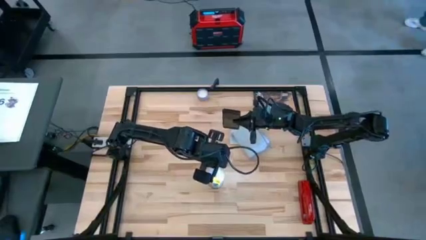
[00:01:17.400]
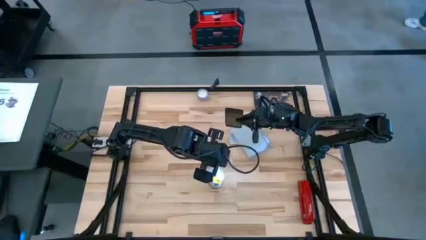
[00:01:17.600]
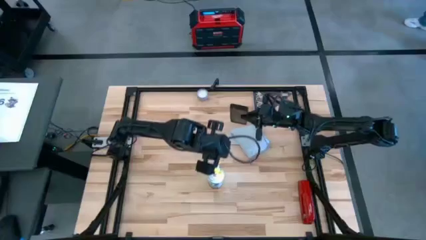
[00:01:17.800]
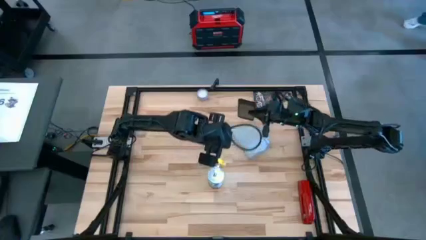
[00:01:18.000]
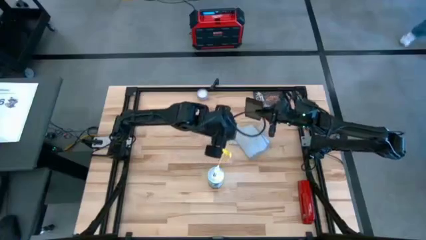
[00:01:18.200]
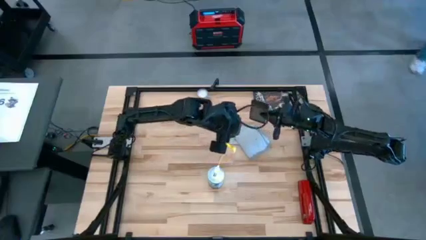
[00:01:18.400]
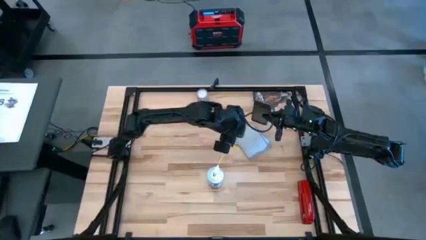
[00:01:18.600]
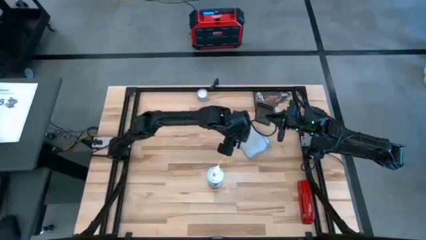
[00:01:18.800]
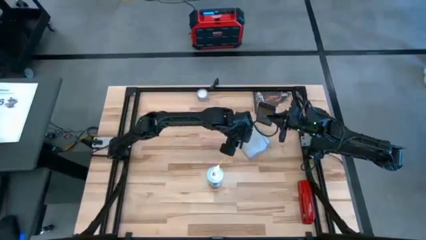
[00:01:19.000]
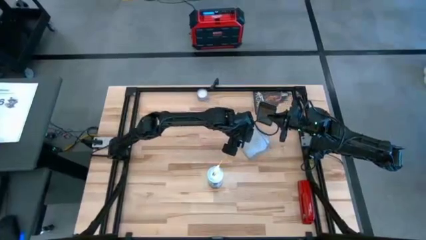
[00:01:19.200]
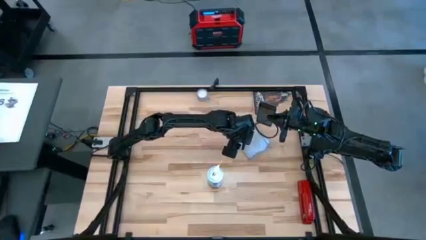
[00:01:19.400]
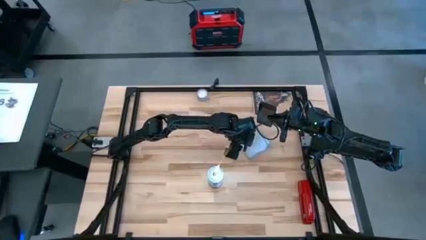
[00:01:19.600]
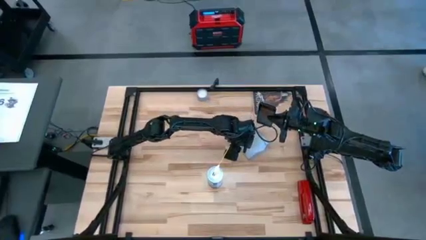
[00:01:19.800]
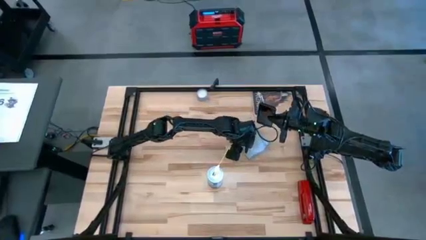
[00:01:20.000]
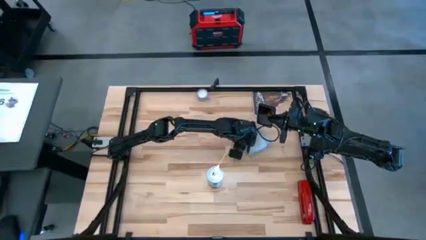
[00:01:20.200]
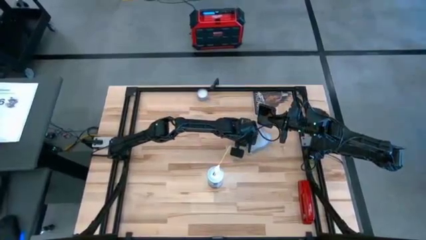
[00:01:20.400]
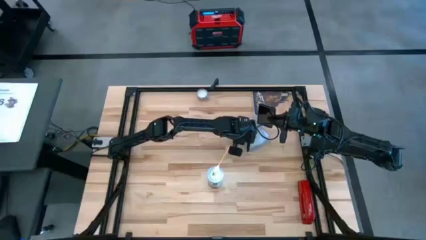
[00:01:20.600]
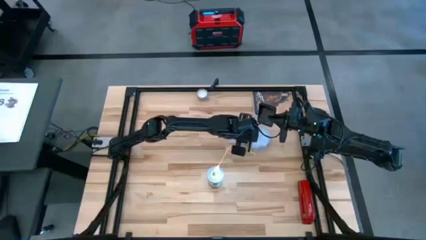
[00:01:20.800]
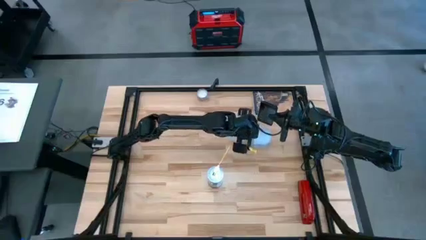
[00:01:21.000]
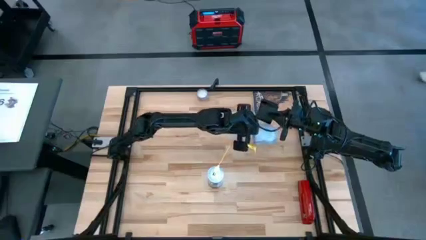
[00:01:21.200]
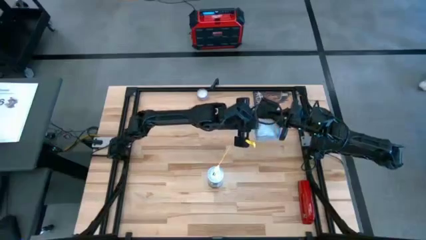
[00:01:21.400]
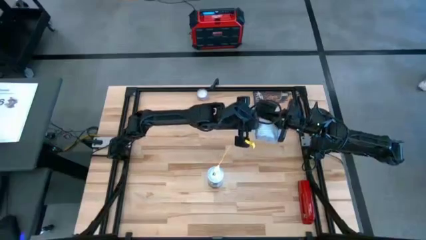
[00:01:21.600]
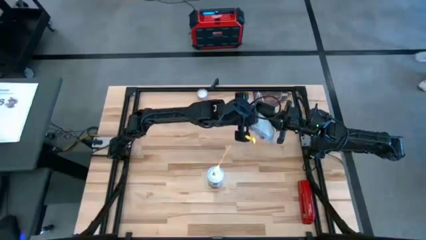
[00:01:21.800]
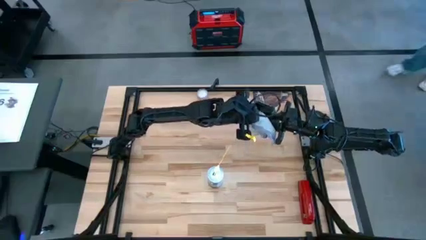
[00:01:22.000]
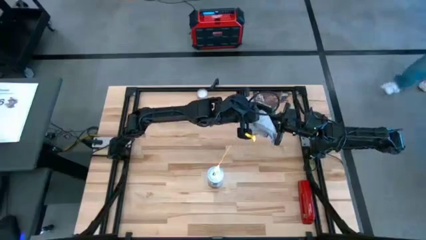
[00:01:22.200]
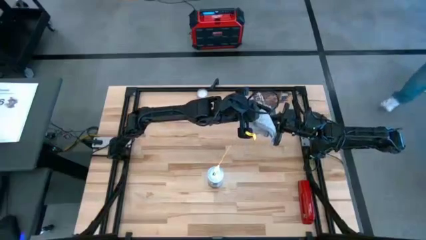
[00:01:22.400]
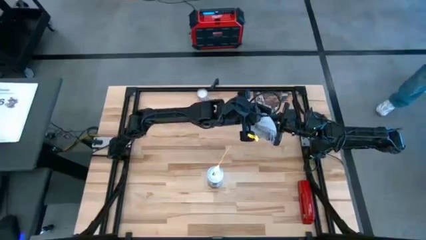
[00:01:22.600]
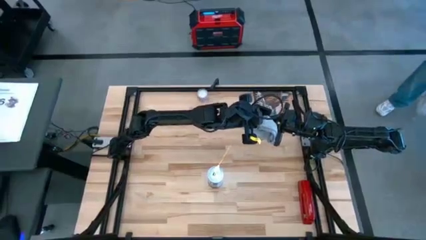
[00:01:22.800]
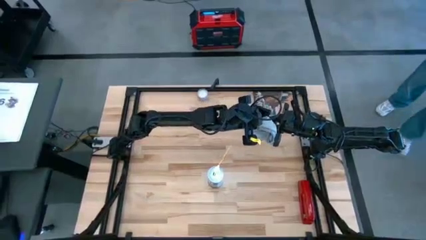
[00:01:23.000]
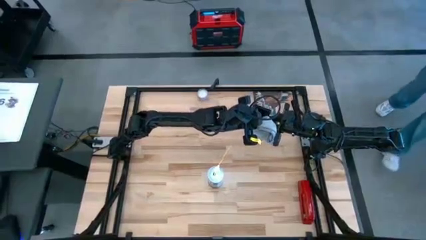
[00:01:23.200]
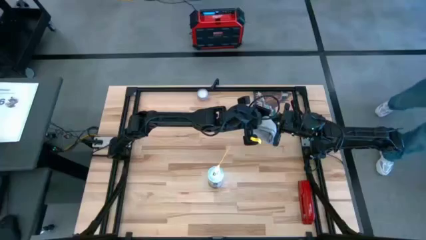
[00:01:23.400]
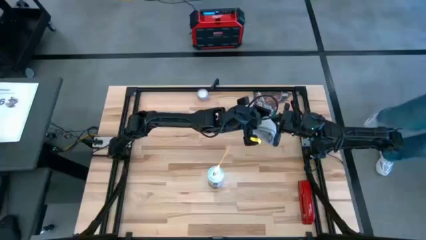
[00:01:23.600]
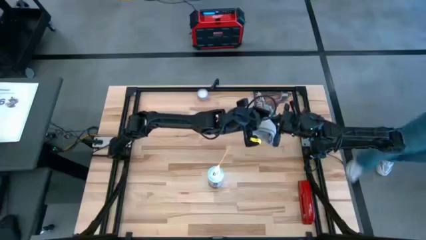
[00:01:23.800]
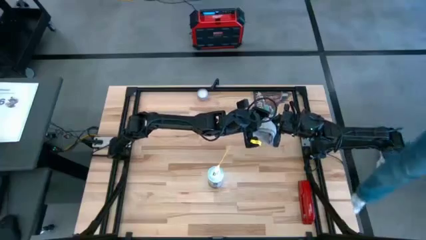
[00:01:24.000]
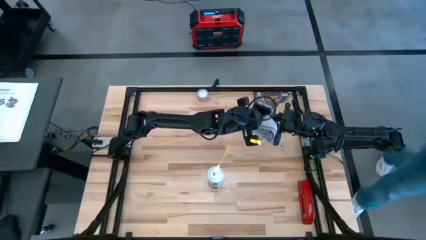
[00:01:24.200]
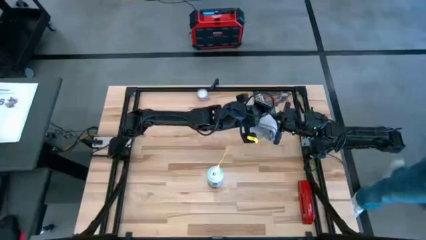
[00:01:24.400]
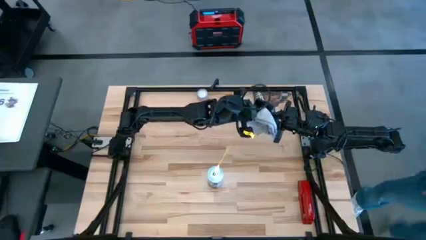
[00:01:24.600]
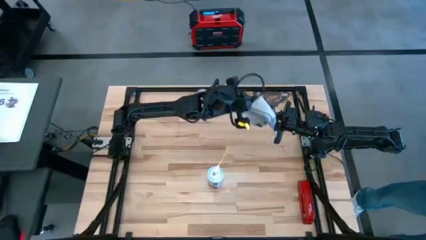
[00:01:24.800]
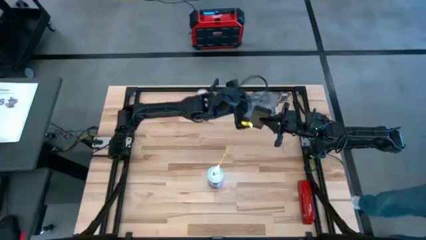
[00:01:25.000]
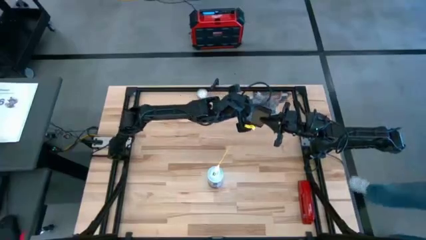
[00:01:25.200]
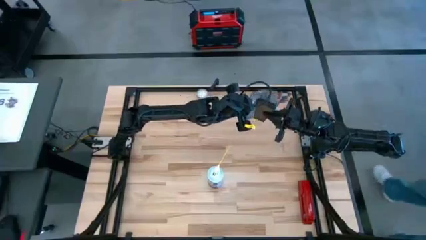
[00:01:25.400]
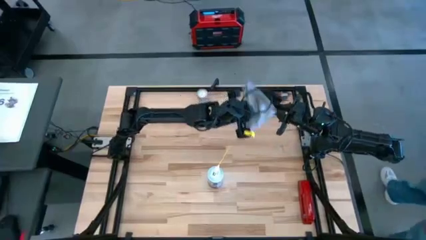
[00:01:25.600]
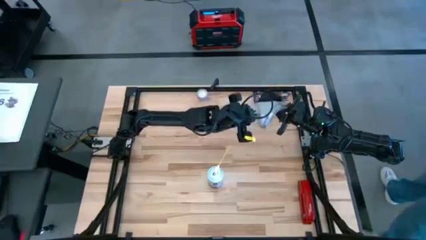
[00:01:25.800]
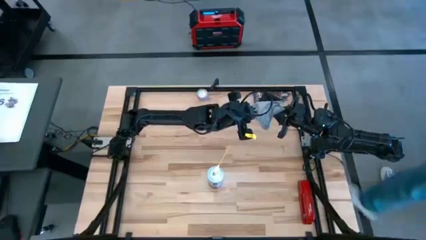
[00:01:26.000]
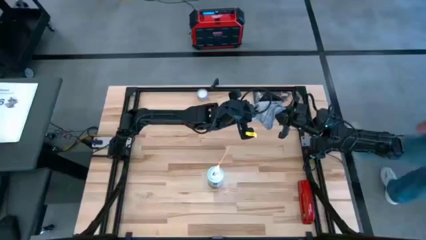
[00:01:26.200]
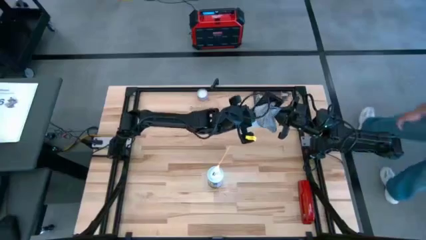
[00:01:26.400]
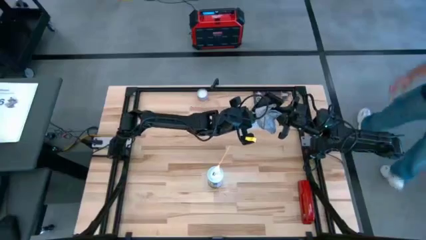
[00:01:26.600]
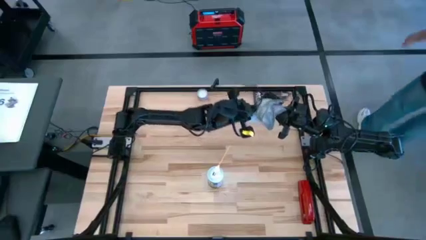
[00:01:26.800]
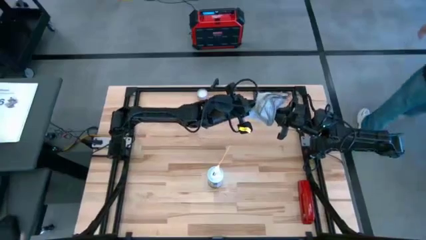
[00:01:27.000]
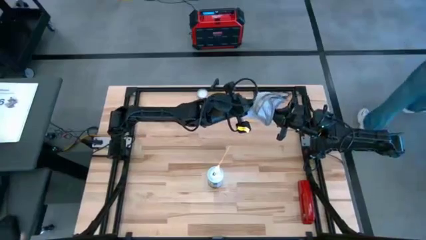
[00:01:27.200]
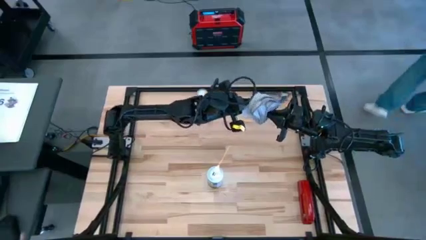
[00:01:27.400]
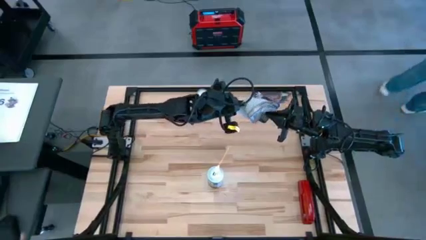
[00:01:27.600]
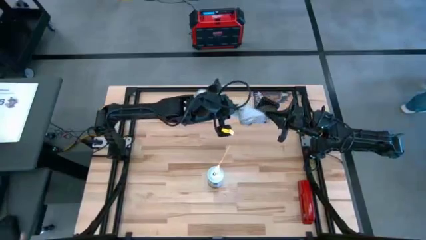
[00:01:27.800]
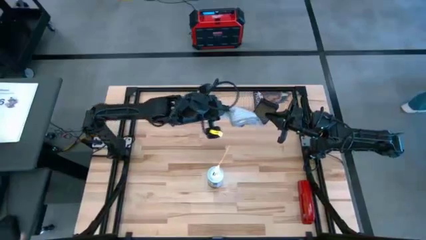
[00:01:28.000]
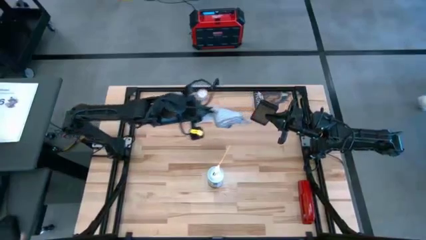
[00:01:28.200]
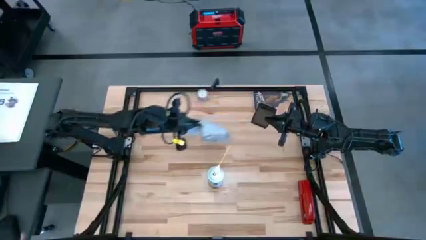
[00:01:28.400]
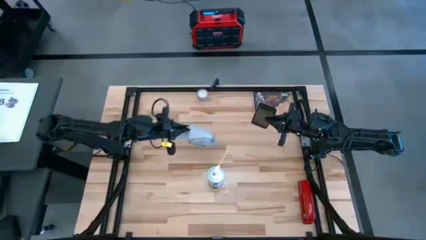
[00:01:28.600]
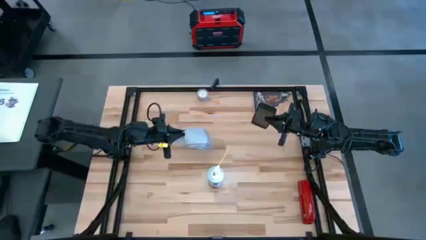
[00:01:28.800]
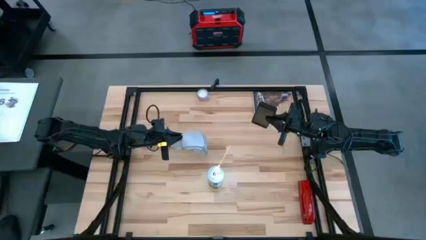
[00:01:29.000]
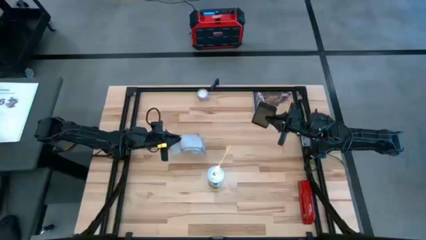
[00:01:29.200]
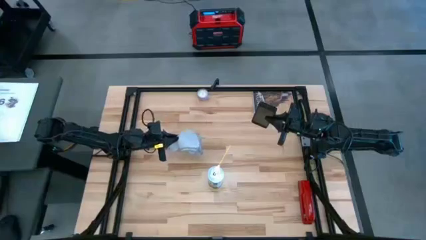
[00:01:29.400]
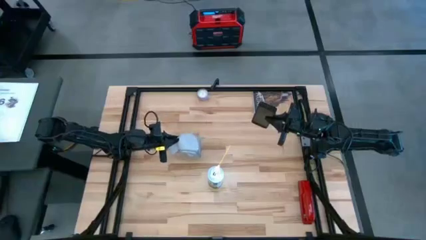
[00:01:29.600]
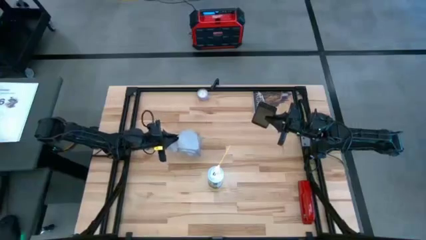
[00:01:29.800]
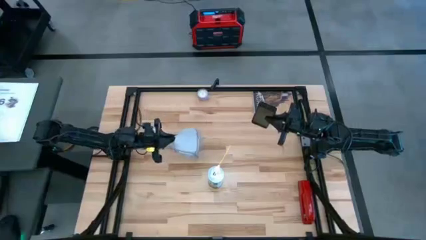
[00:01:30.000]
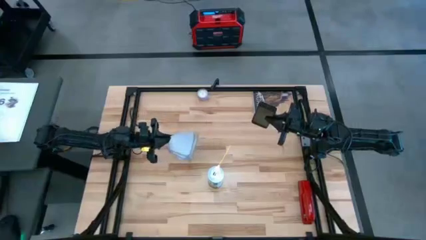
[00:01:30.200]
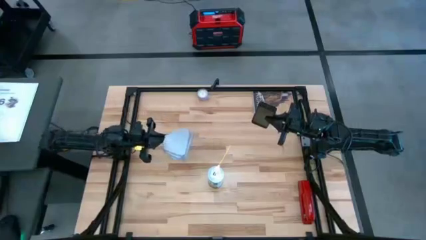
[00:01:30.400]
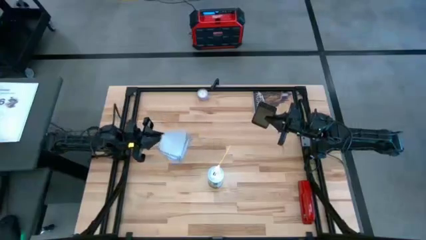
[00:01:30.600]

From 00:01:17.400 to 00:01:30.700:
Task: Apply microfiber cloth
Wipe the front of the cellphone with a gray microfiber cloth

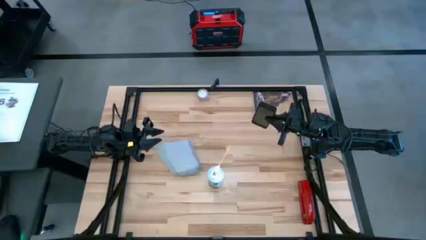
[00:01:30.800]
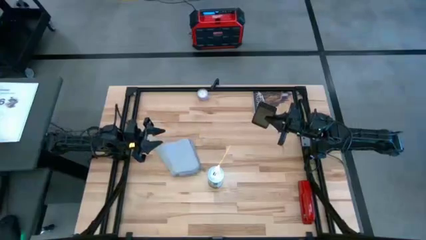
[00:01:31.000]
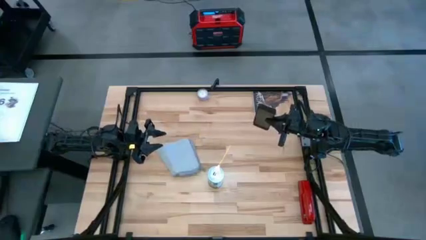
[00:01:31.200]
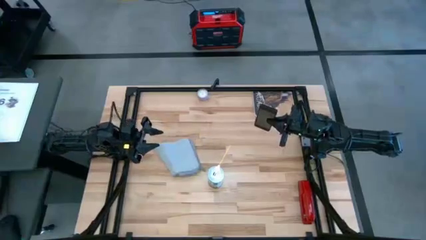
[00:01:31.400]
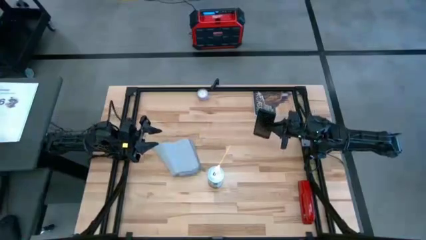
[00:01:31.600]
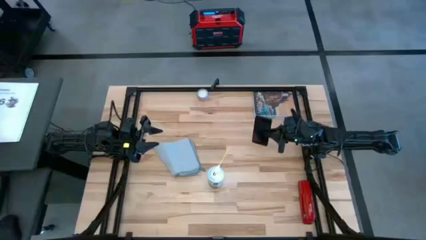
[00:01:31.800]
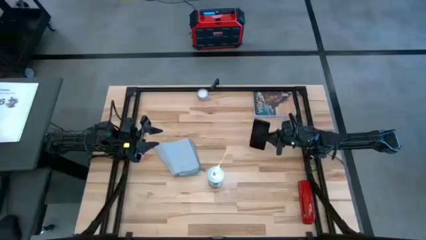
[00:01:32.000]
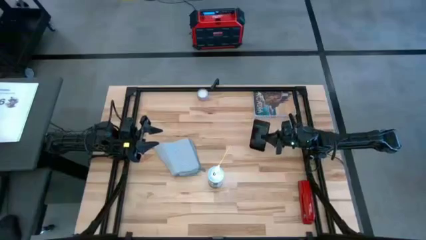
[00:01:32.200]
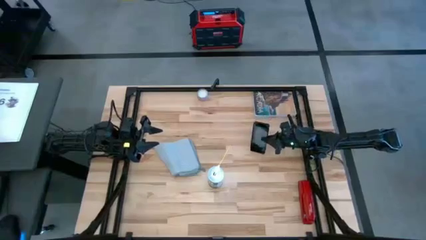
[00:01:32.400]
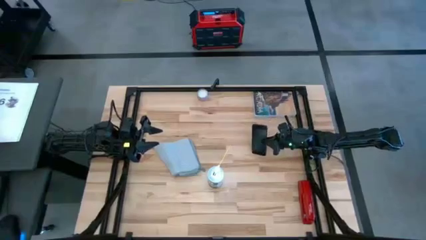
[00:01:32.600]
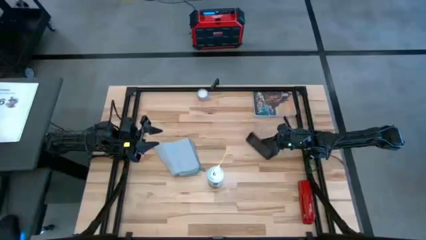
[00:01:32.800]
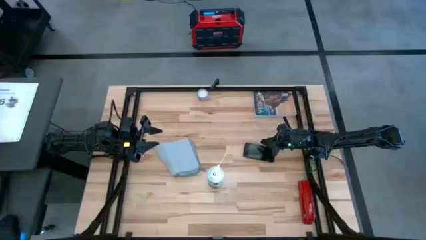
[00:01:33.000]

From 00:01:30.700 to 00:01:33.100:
Put the cellphone on the table
